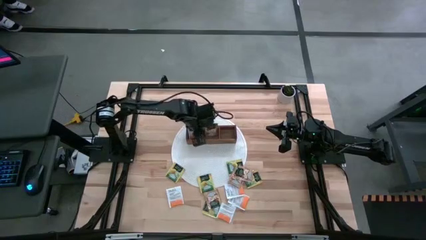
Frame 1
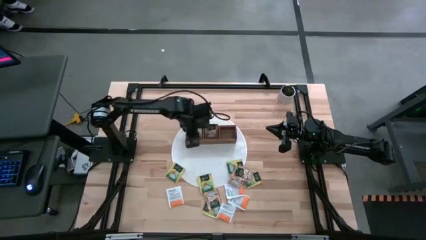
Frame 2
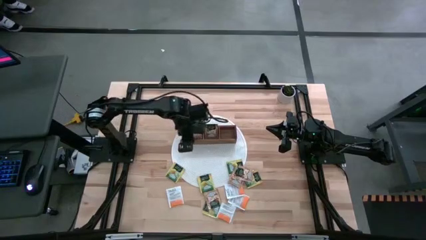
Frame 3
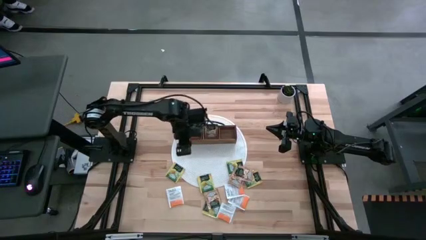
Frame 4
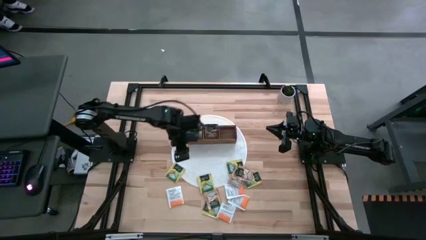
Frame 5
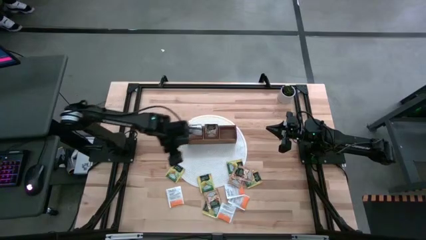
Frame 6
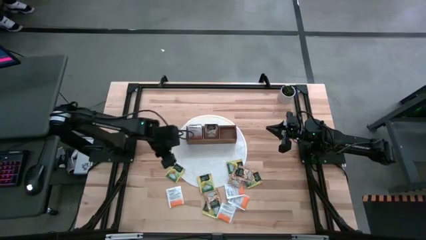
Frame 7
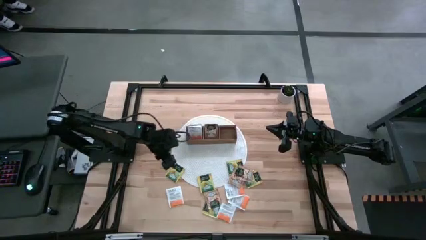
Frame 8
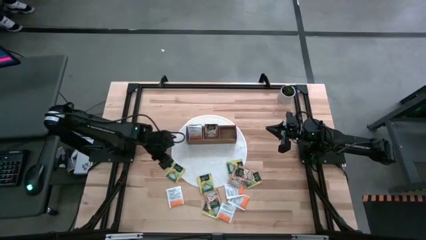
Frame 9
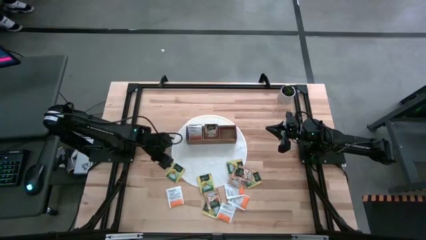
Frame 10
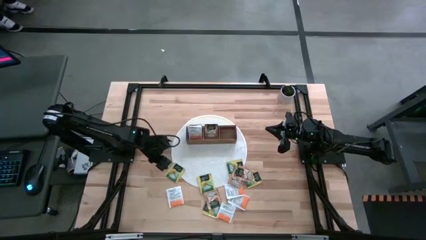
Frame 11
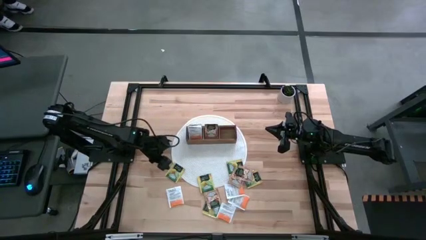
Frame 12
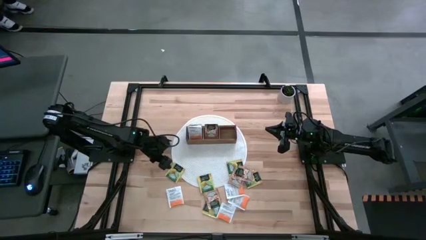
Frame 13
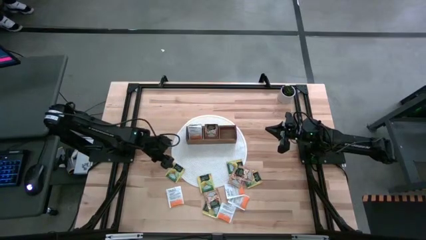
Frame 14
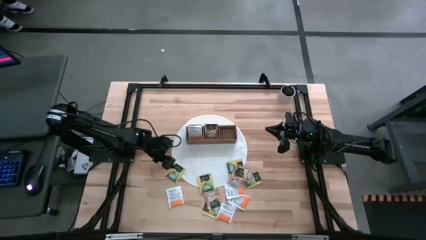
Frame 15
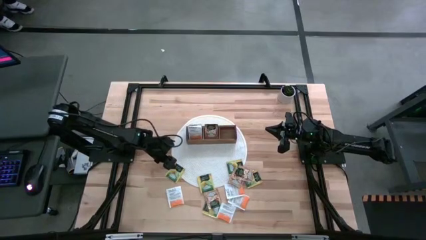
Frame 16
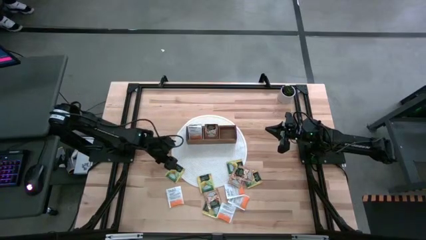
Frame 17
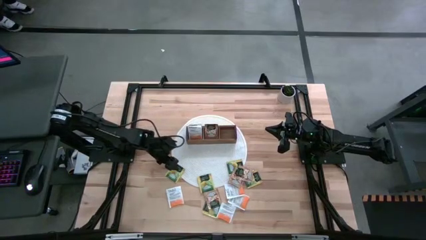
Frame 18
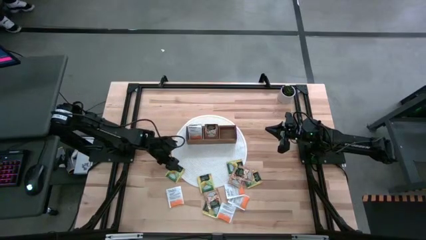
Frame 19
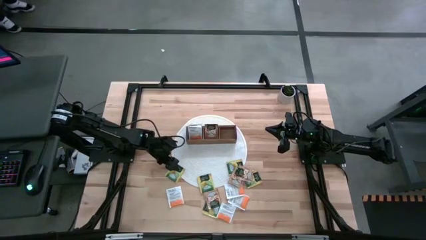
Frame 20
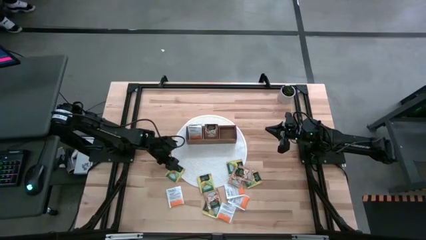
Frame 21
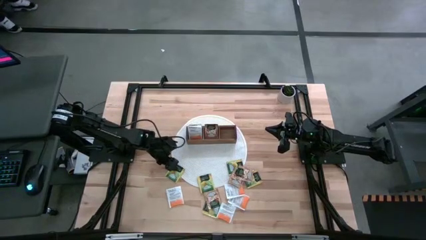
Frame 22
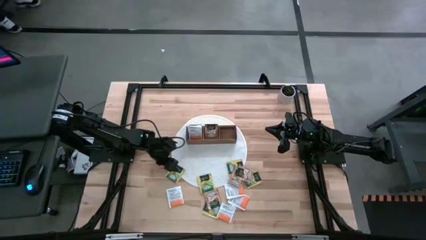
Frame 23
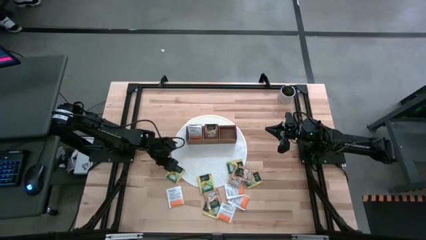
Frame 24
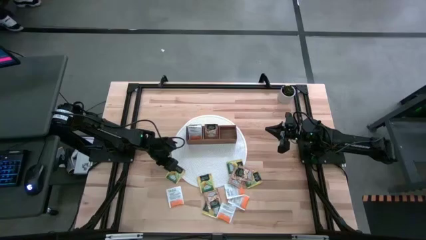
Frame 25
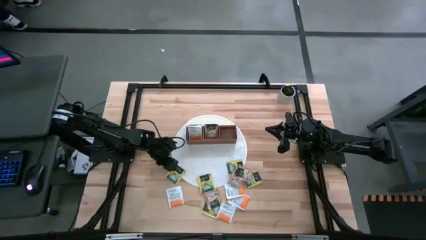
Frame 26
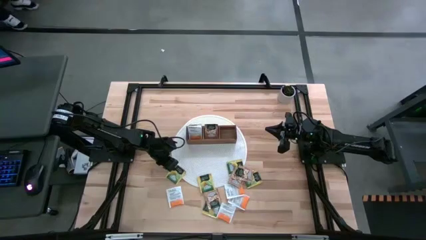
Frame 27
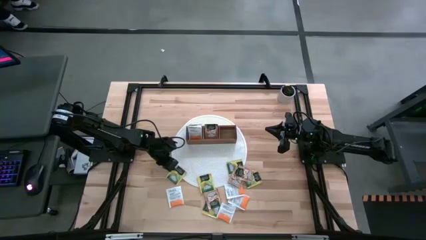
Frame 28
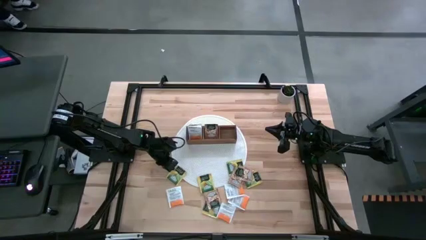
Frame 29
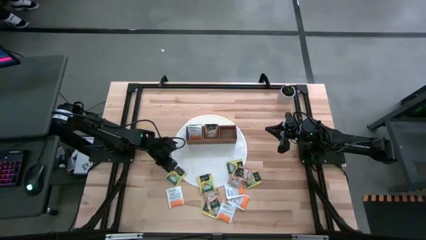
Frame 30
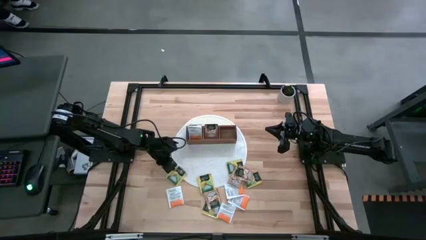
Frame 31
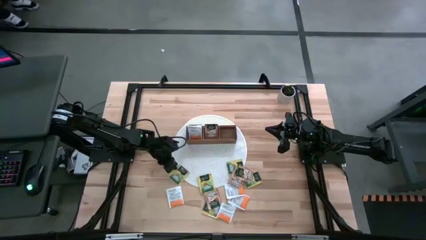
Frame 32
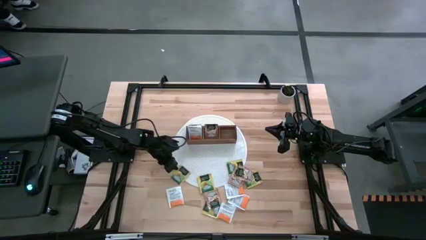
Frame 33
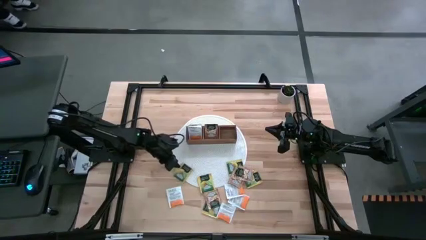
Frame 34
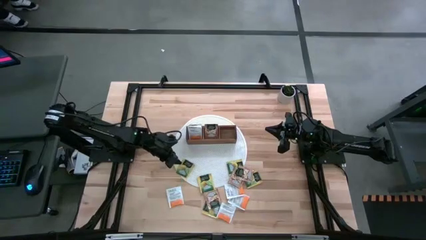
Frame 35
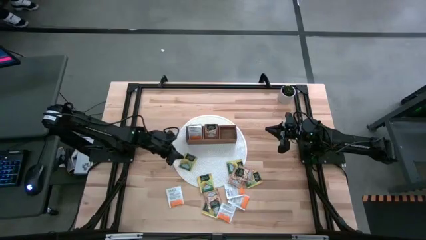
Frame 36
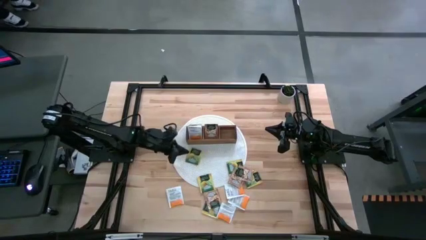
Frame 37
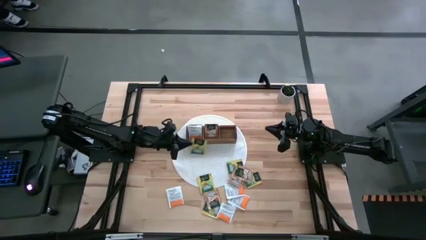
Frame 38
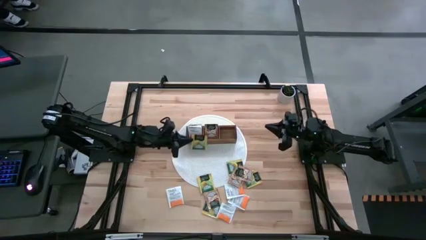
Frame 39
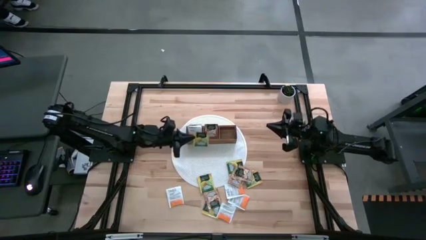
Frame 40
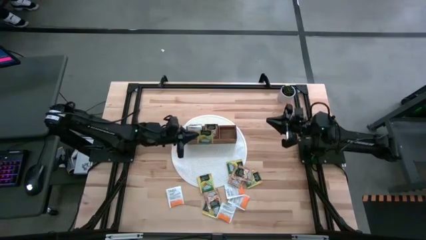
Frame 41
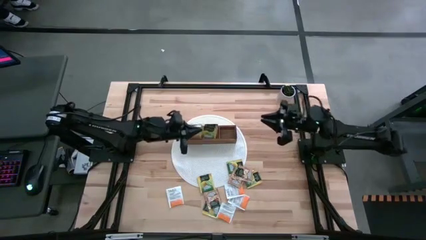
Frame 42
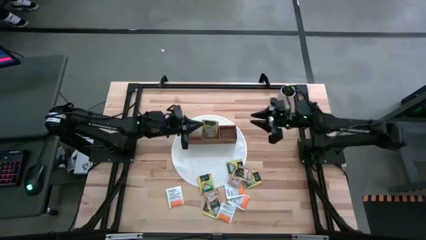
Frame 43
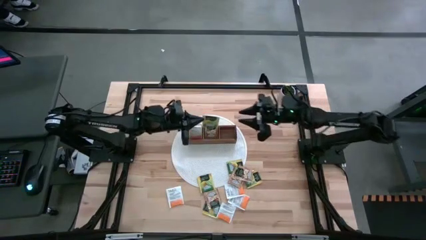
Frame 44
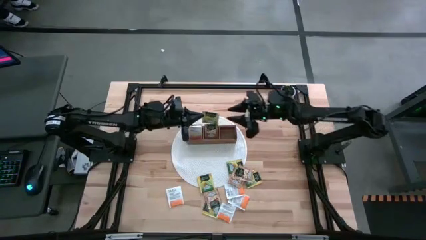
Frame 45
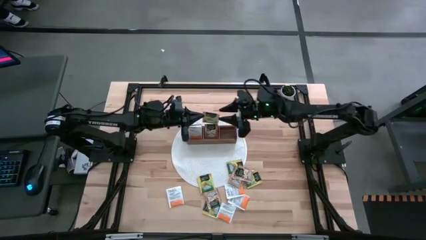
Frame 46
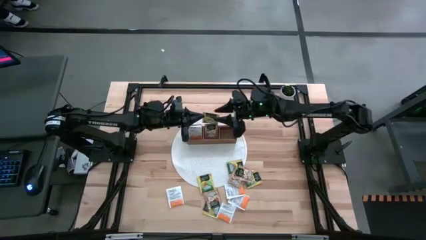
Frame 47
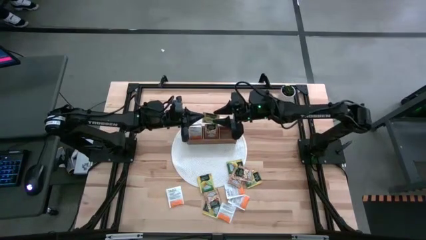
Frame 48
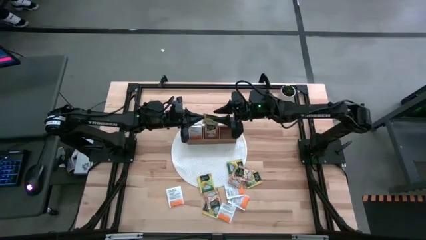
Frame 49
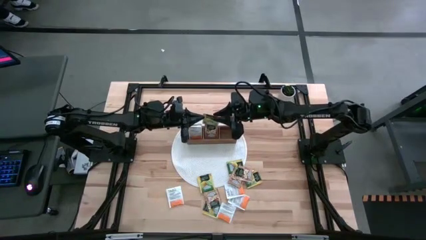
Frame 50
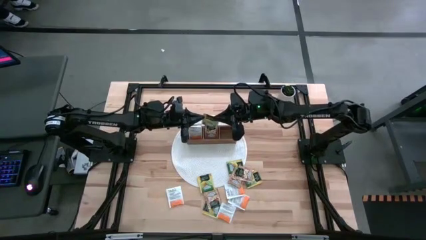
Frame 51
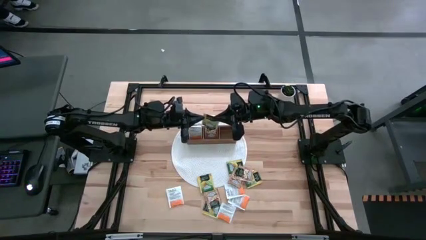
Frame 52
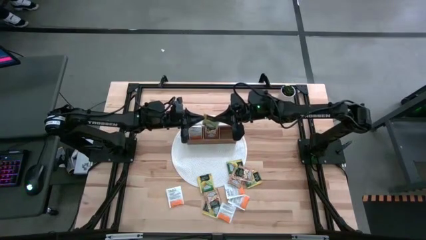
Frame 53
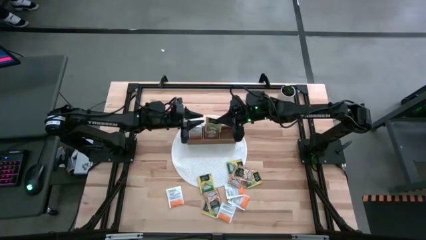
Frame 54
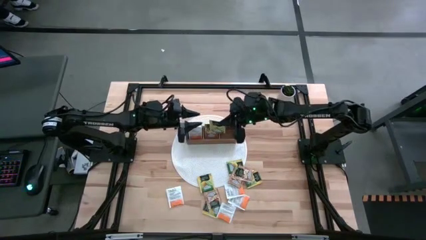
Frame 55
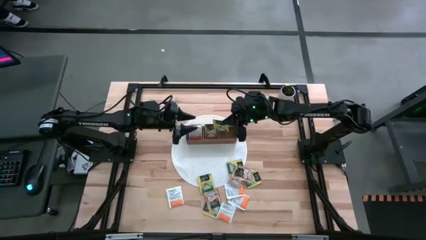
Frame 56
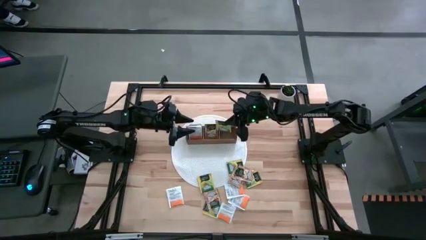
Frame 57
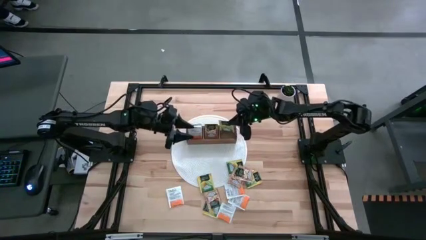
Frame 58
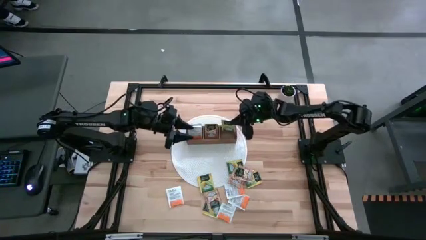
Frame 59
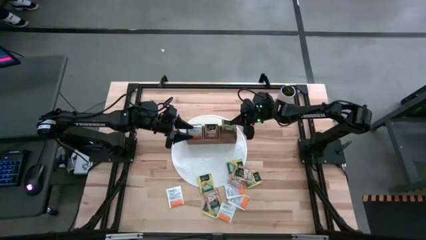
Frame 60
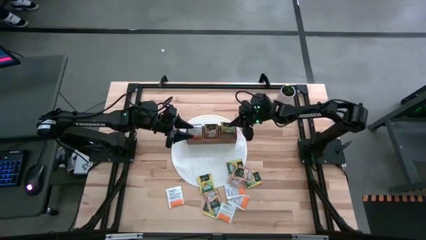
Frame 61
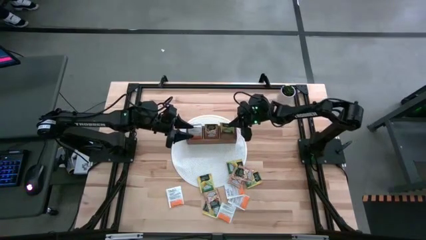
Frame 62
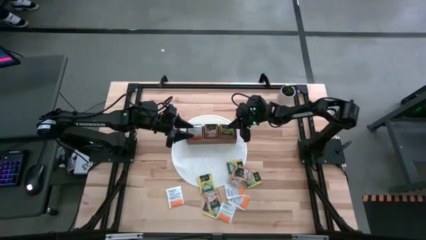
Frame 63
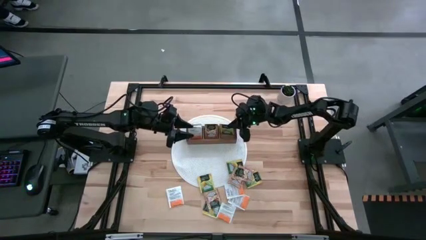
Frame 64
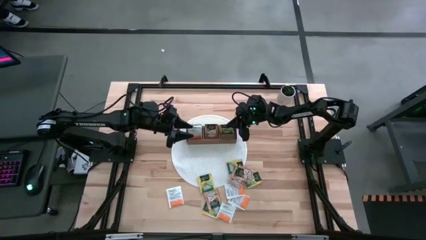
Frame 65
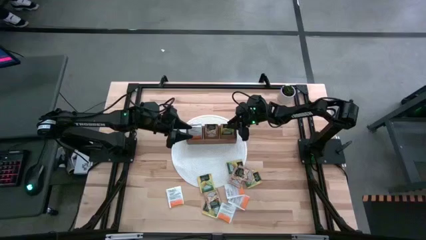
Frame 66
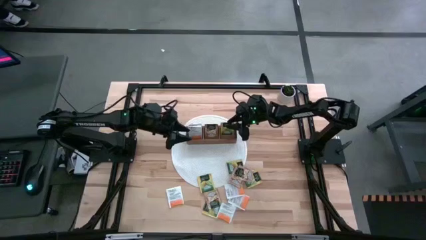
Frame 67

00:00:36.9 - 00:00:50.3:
Task: Pick & Place Tea
Put the yellow tea bag into the right section of the wooden organizer

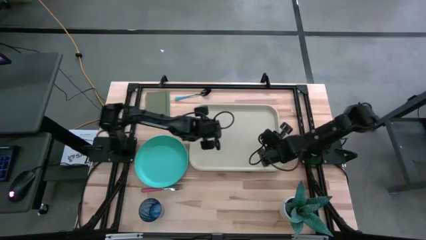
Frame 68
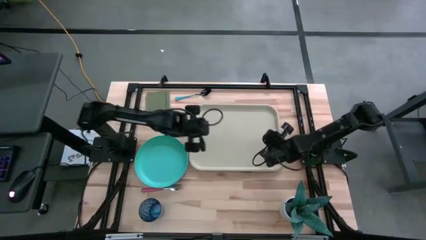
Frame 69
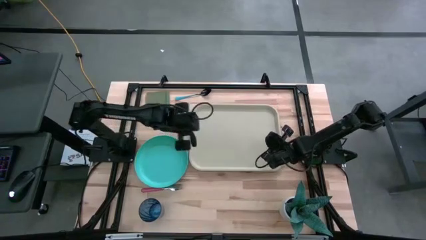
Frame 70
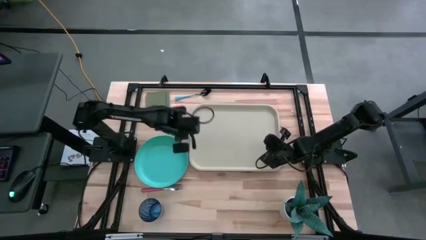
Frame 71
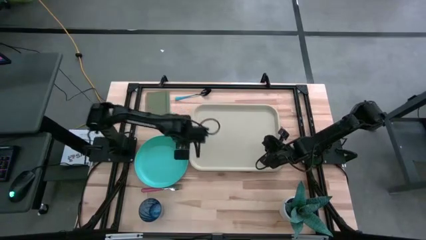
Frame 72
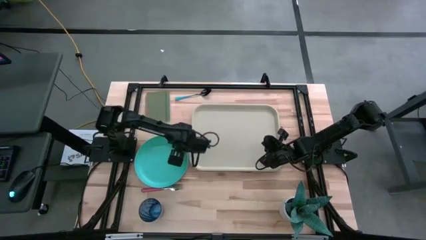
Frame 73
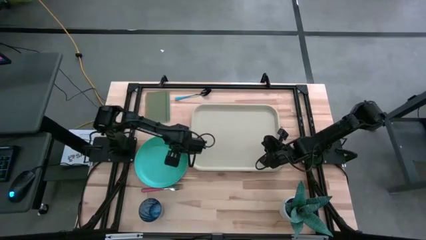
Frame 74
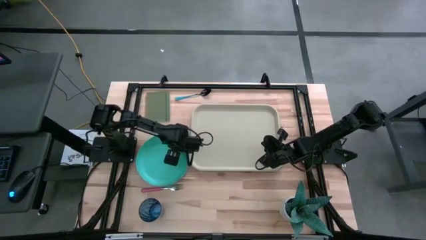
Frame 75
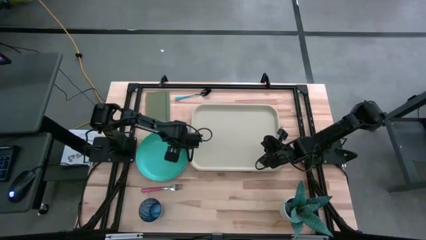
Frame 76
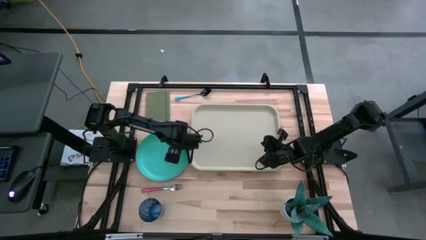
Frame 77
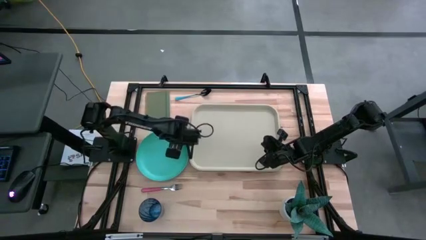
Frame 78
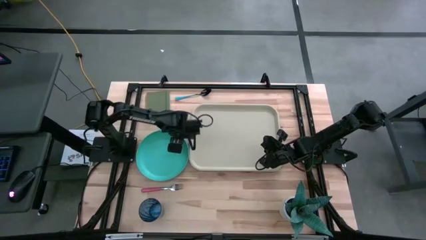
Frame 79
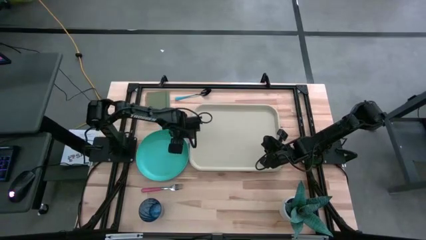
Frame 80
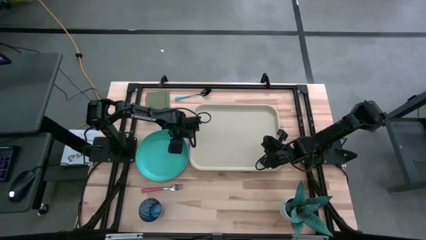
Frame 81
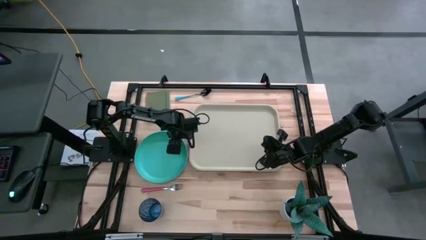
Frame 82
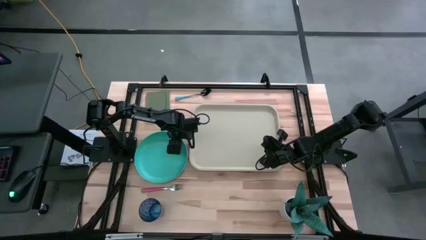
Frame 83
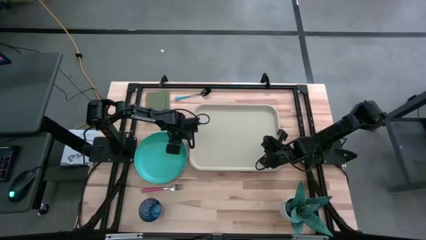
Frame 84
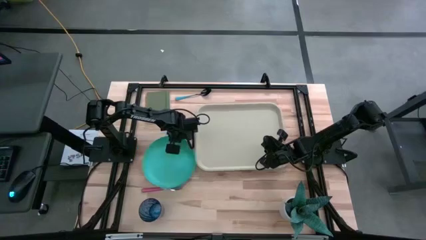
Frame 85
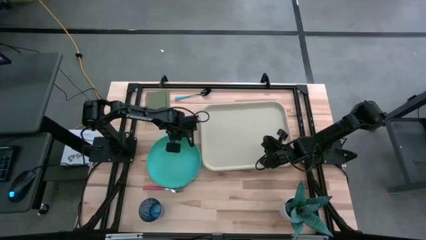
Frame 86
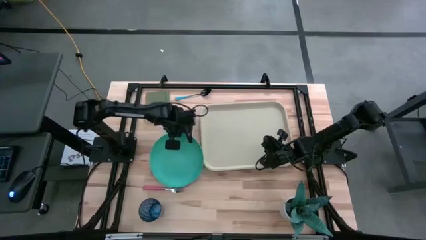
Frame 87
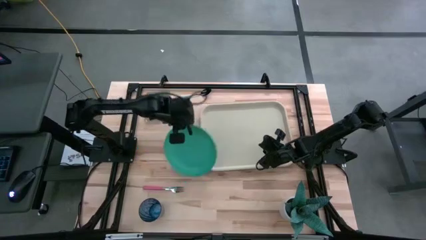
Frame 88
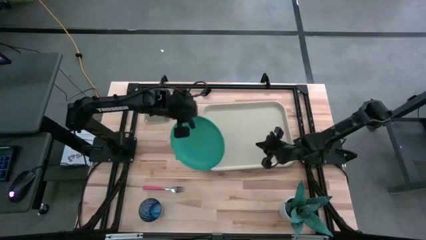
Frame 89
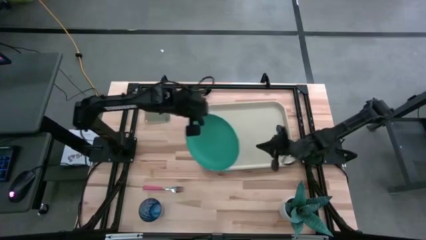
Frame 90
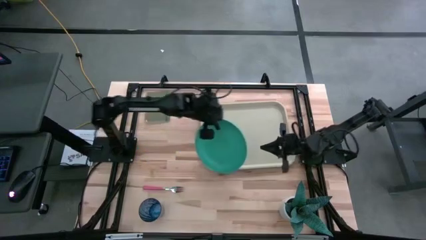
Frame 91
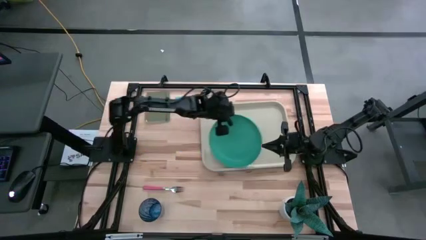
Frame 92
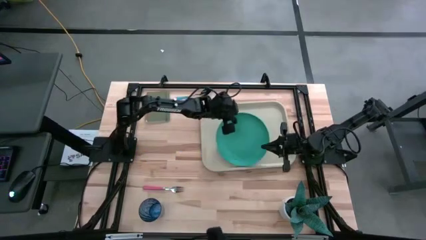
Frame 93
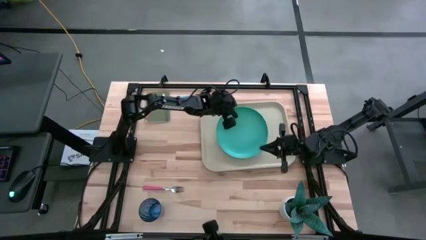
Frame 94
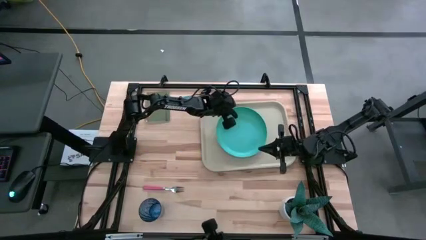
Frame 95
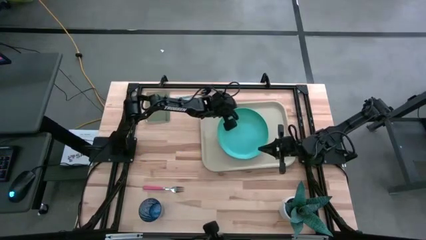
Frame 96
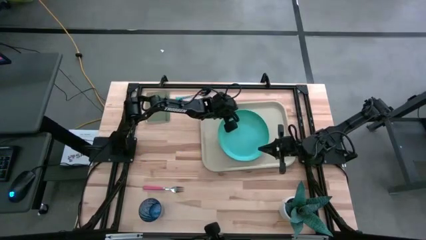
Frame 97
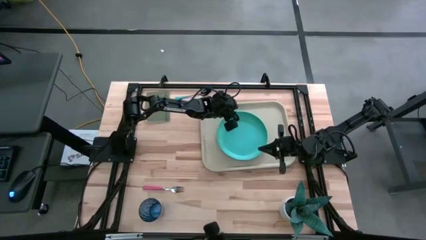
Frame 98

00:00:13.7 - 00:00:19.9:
Task: Pick and place plate/cup/fork/spoon on tray
Put the green plate to the middle of the gray serving tray
